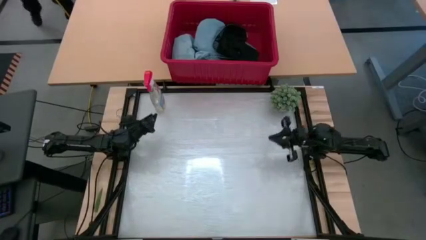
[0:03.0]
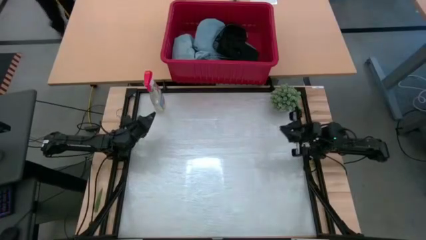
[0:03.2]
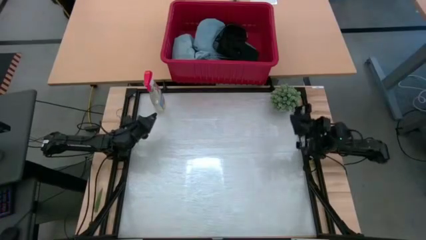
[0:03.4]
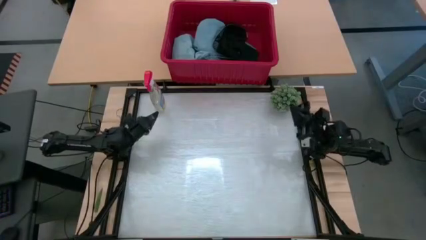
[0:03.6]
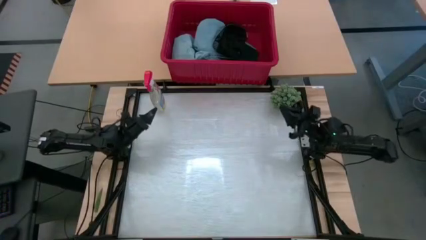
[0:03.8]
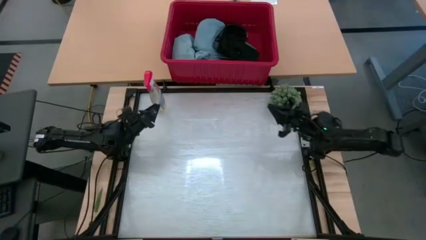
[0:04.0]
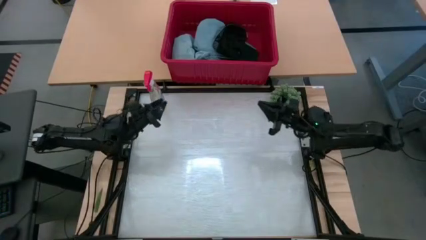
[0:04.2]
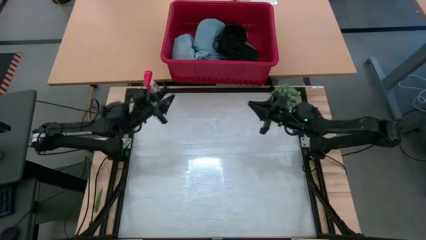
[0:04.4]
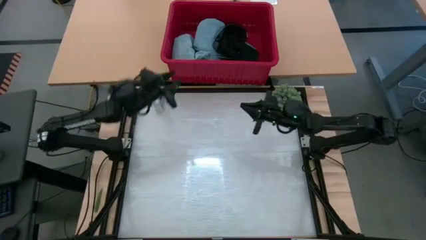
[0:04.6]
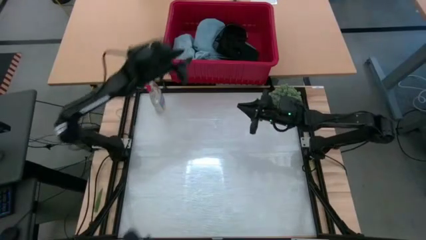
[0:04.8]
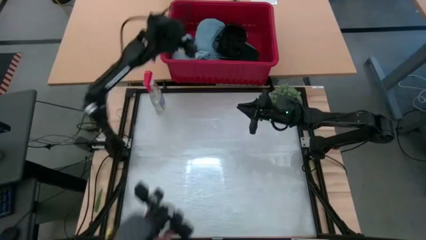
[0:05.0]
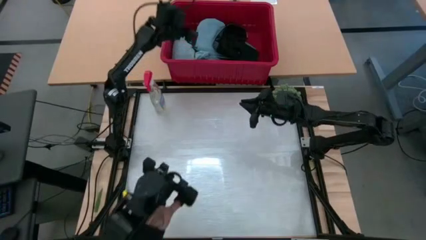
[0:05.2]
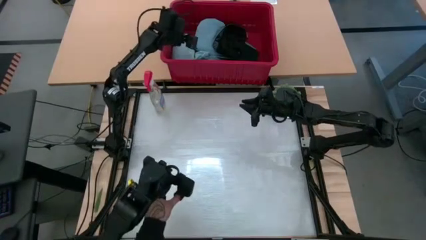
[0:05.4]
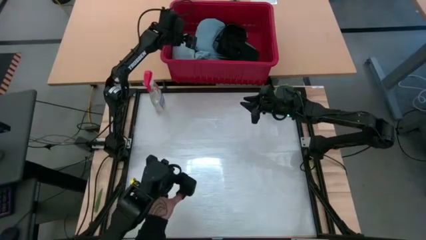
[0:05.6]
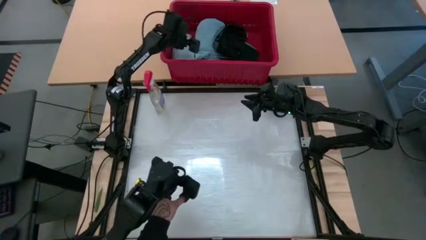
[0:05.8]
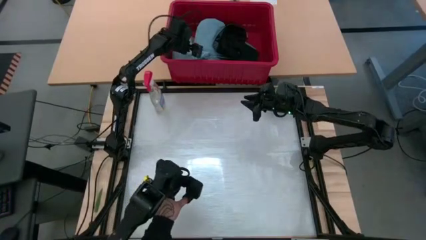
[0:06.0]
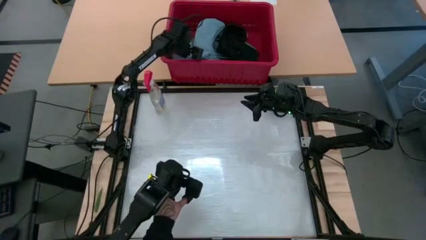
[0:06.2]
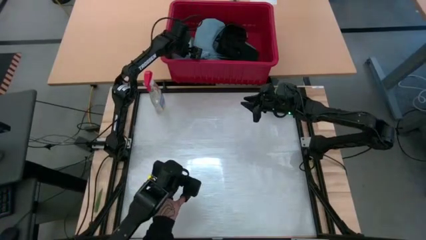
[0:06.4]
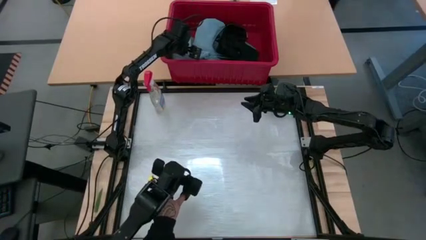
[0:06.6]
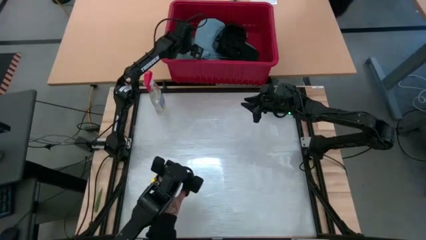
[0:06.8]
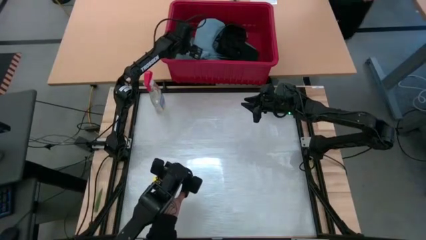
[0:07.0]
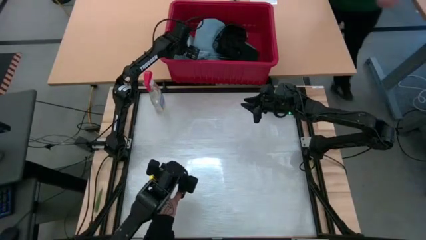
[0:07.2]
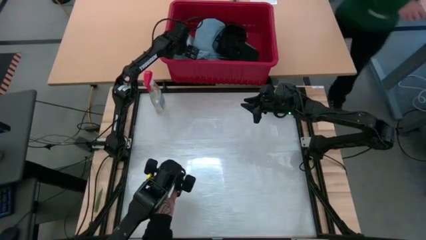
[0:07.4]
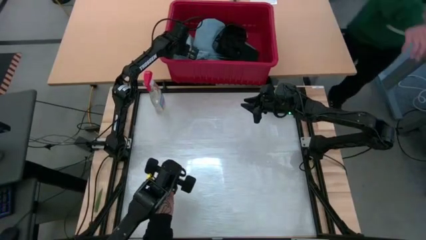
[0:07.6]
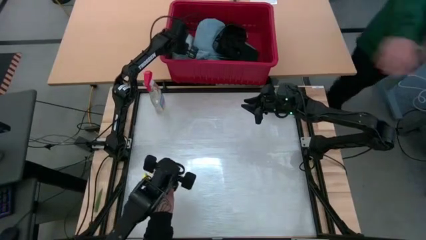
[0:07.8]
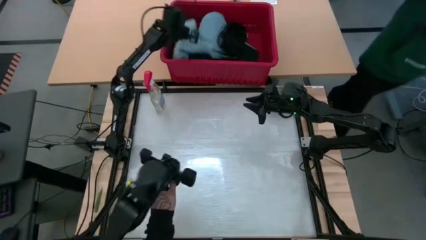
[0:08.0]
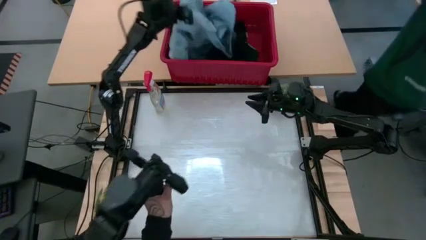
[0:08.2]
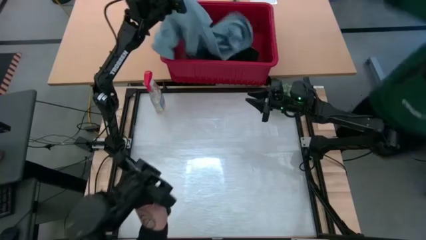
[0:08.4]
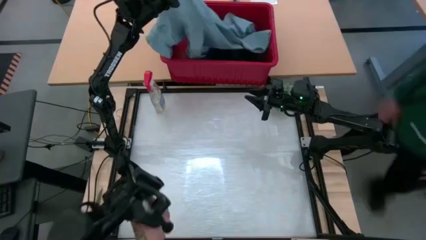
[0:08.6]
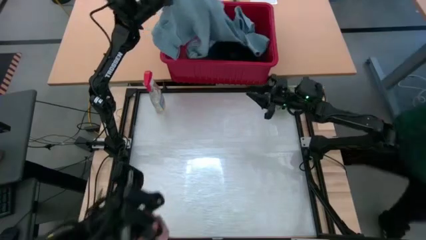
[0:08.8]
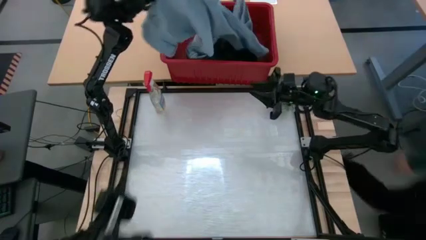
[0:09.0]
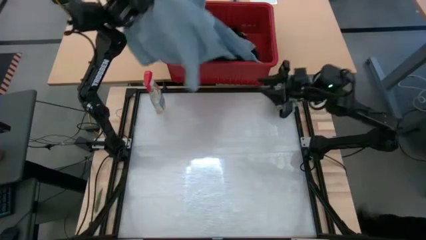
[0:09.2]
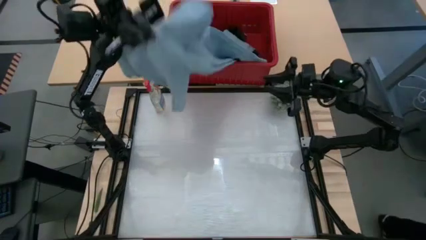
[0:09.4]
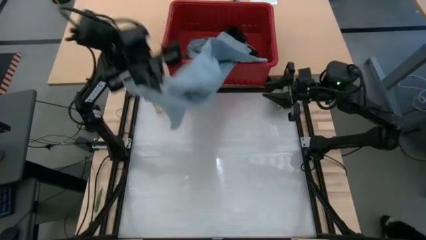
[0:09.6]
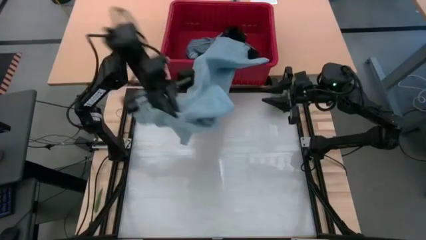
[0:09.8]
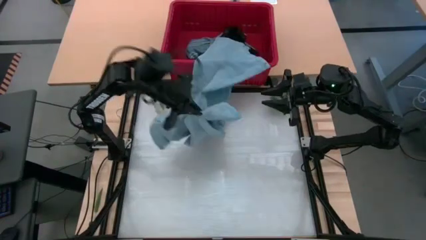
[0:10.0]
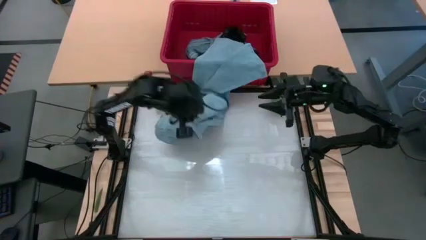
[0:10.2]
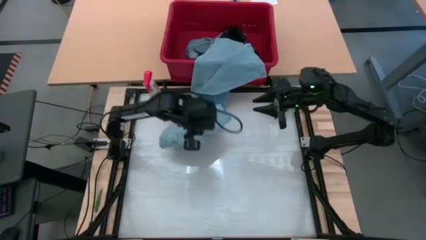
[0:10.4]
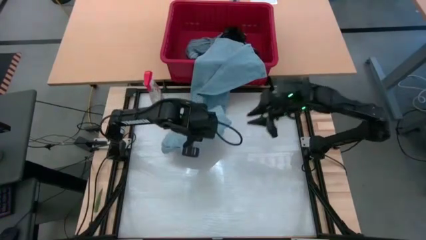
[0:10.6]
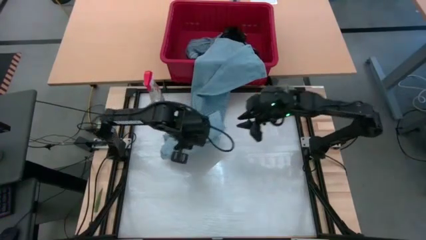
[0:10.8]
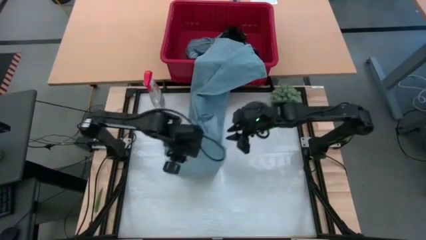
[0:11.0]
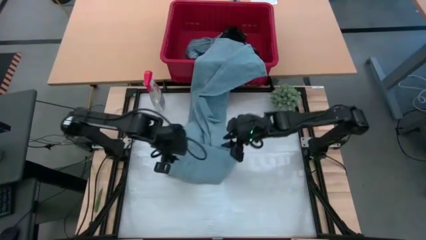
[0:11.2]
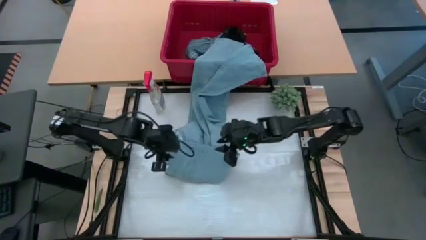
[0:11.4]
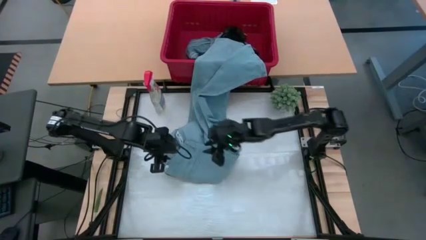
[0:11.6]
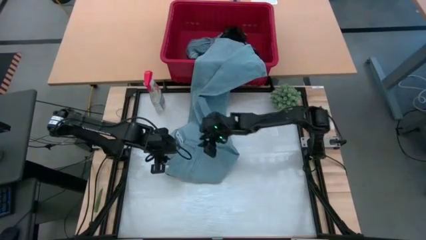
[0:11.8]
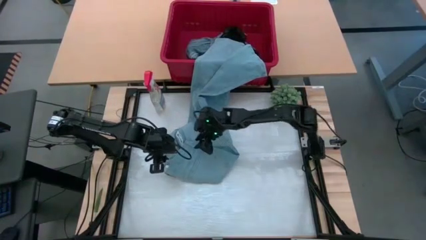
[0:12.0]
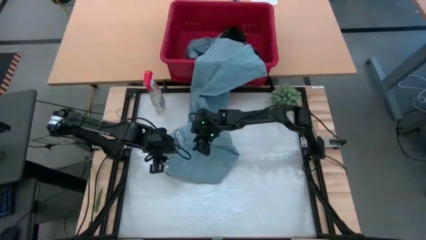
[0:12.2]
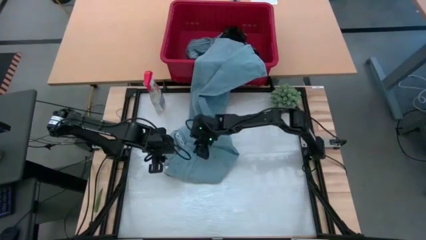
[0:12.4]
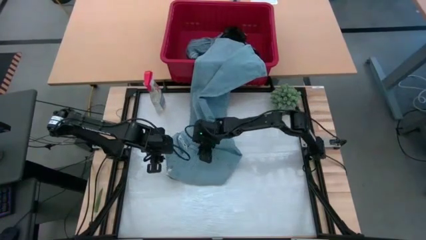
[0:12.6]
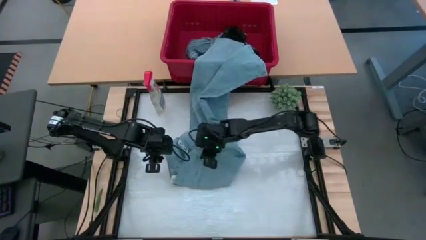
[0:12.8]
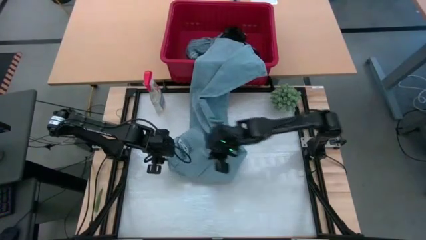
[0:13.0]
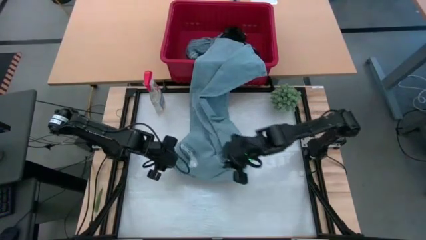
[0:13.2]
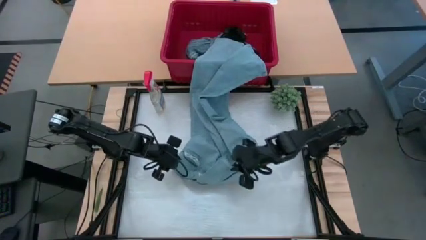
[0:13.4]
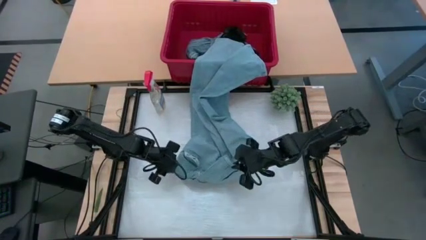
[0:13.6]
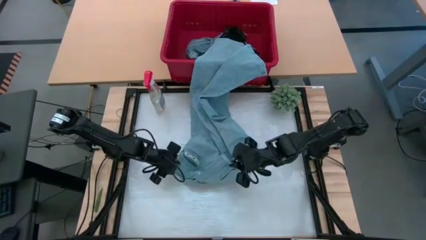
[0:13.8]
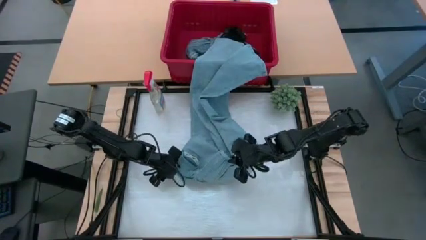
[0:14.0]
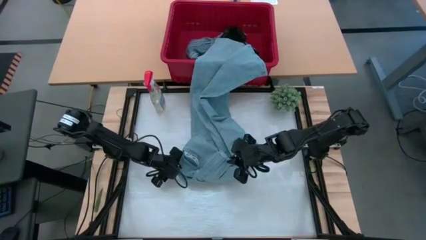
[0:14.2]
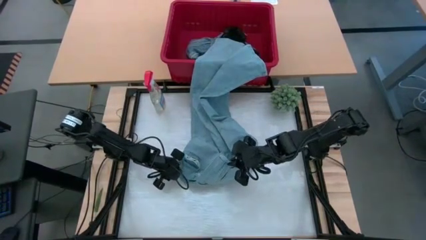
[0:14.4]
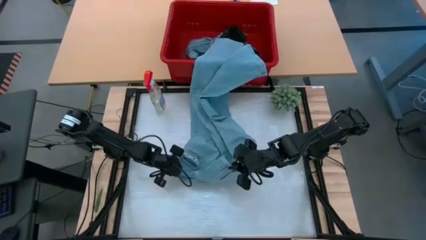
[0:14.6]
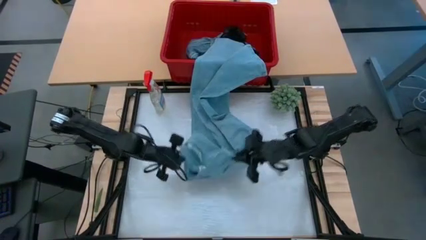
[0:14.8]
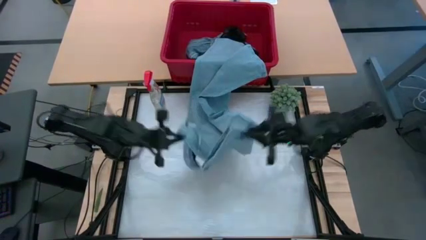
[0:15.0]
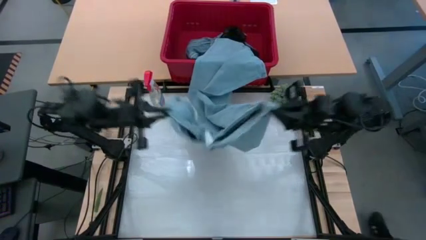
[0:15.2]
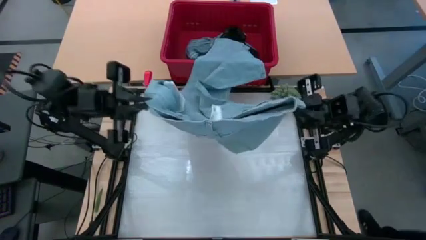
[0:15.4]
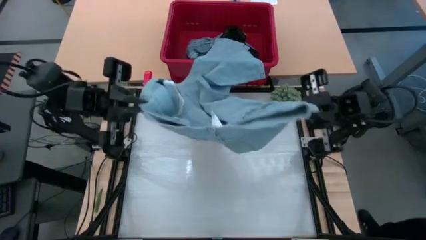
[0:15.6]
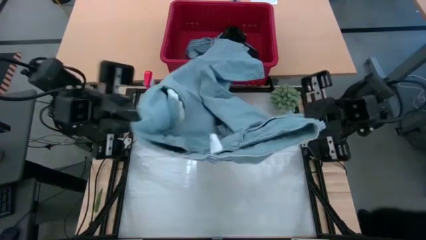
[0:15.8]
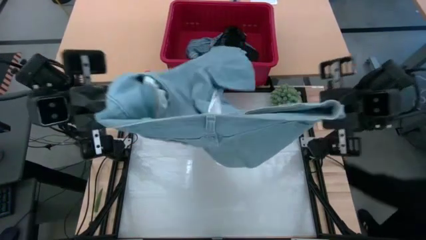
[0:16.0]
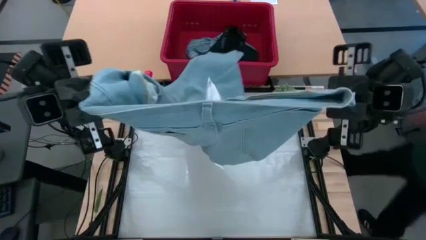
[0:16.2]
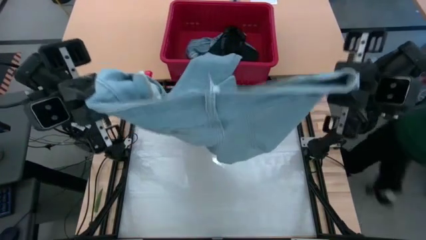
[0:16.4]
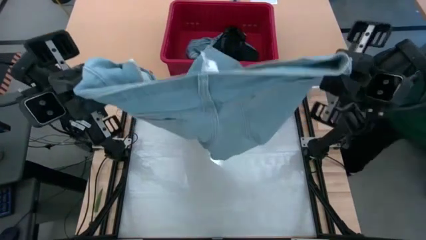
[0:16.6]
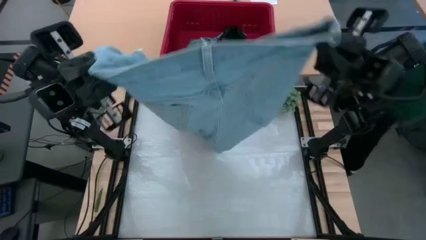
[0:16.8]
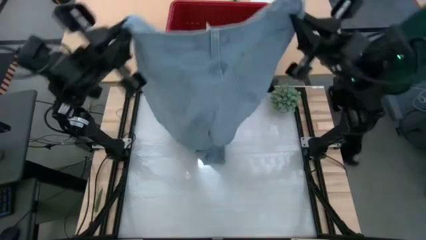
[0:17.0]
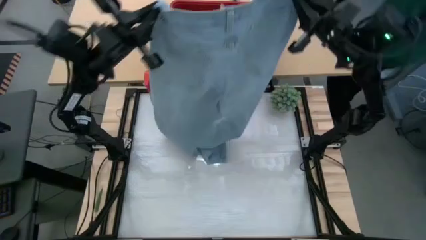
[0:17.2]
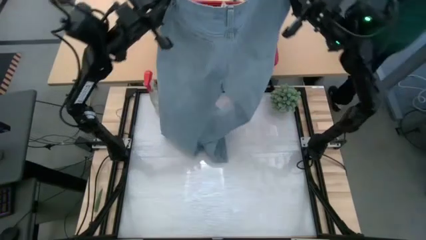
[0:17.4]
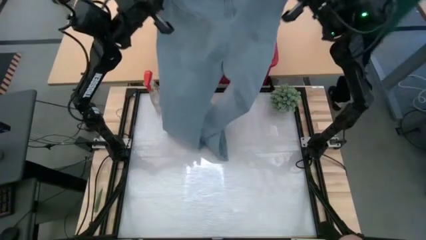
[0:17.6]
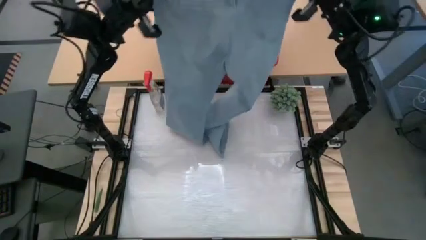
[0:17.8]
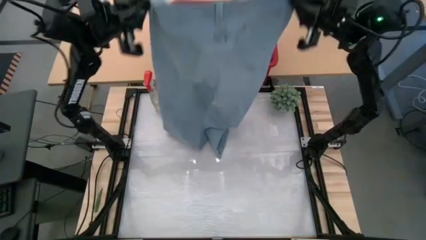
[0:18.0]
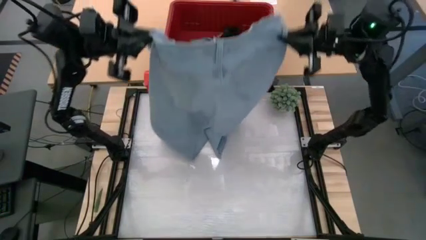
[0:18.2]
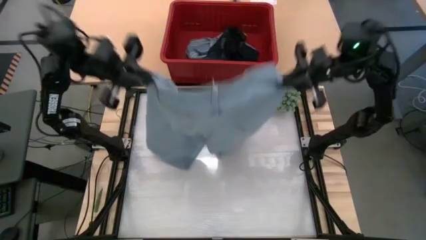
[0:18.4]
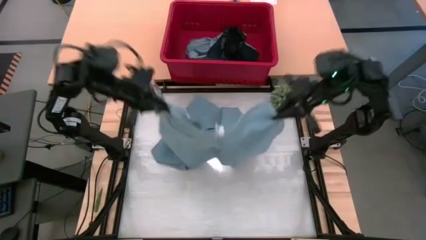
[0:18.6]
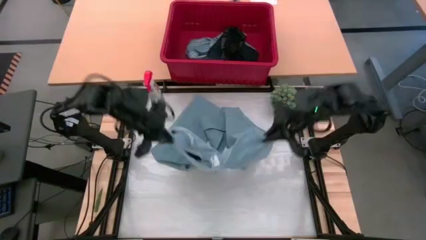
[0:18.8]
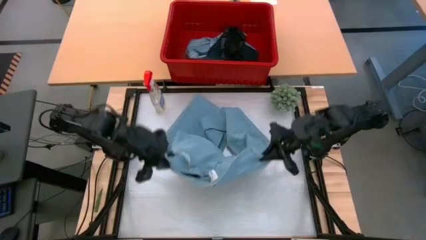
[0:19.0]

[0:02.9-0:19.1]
Task: Fold Laundry from Bin
Fold the blue pants from the red laundry bin
